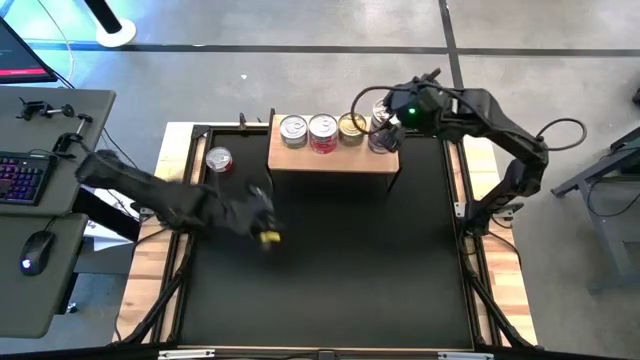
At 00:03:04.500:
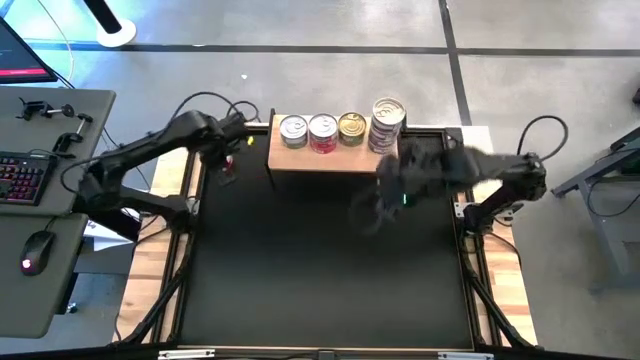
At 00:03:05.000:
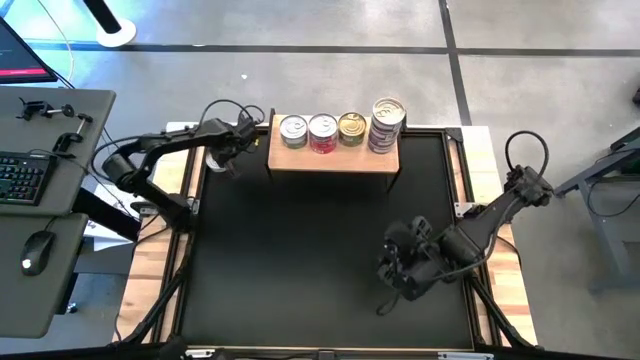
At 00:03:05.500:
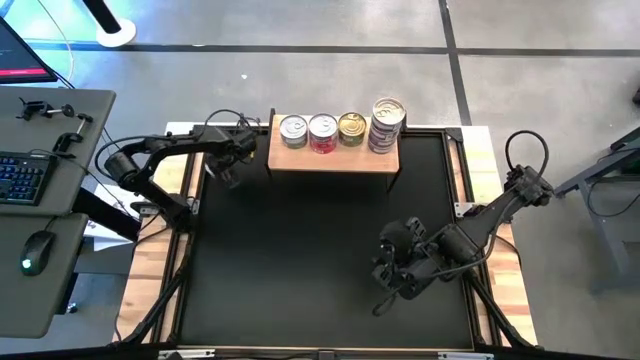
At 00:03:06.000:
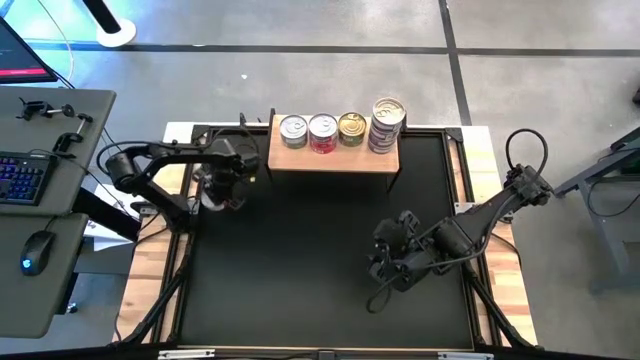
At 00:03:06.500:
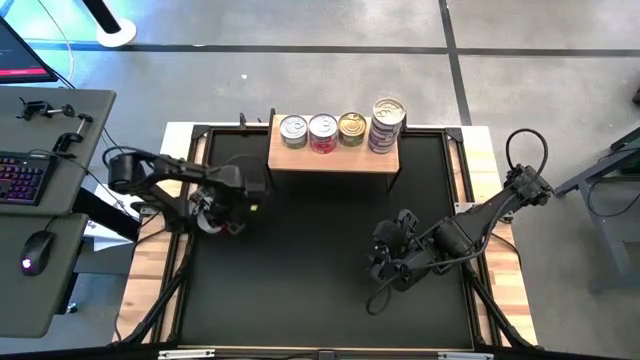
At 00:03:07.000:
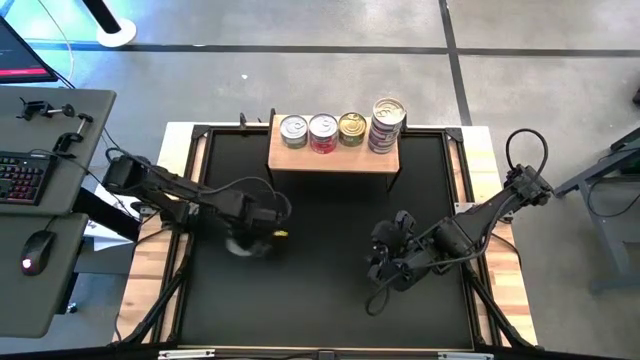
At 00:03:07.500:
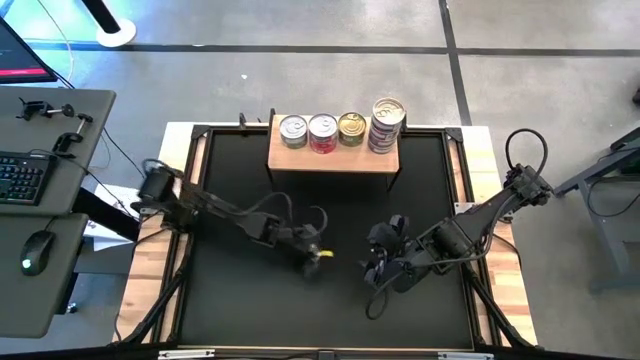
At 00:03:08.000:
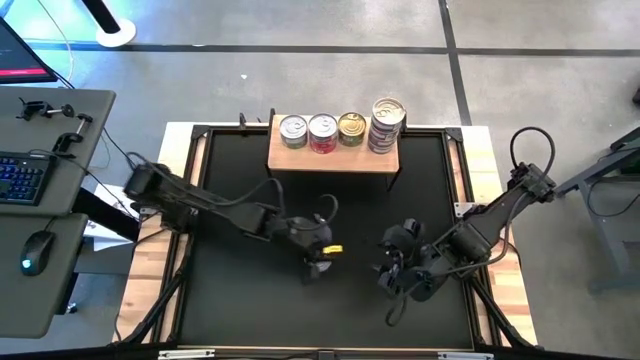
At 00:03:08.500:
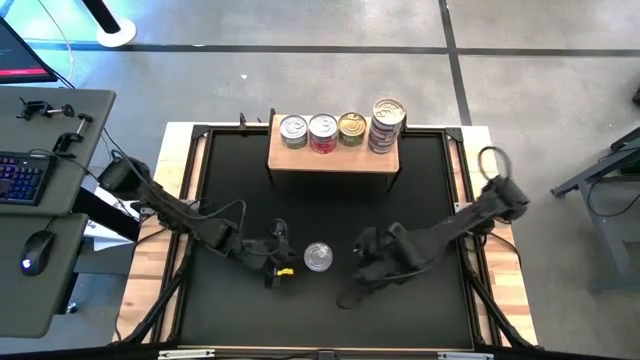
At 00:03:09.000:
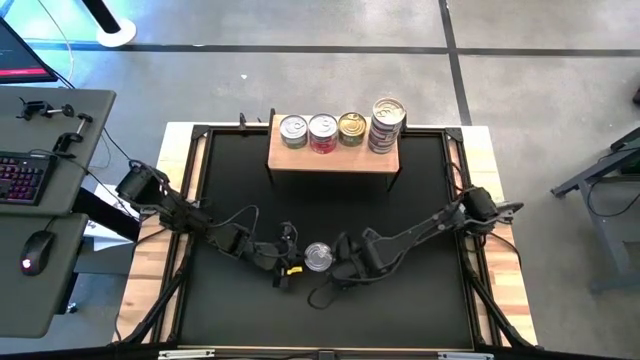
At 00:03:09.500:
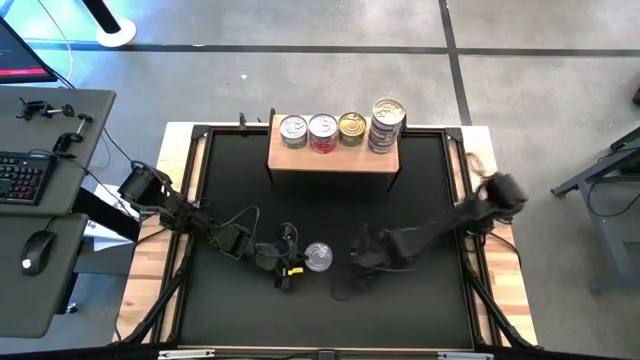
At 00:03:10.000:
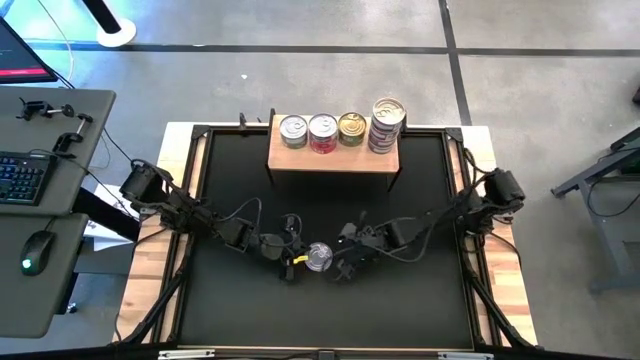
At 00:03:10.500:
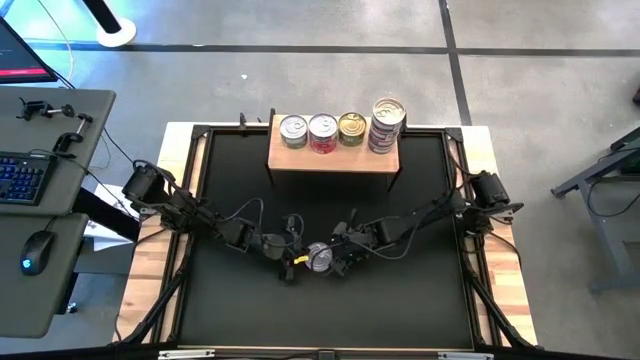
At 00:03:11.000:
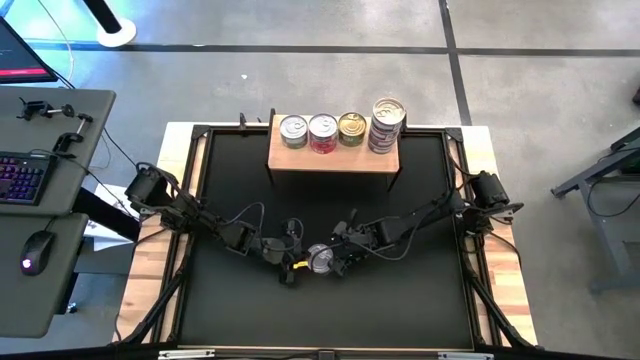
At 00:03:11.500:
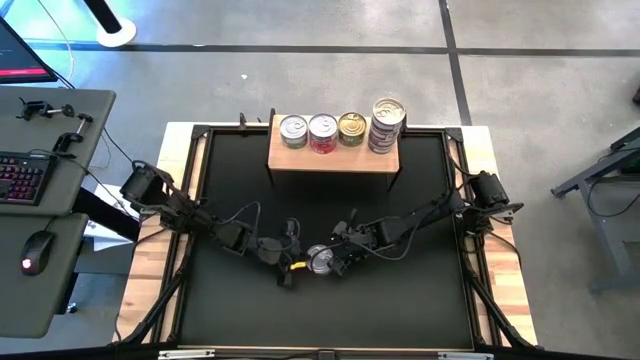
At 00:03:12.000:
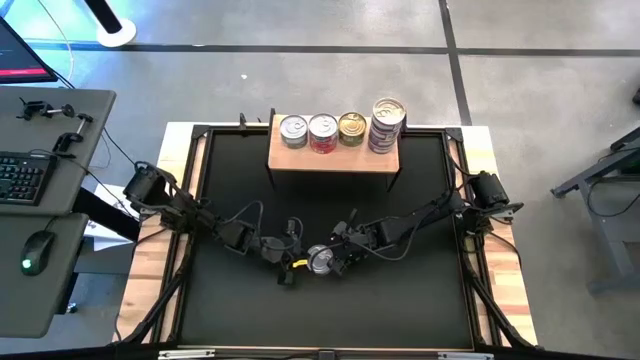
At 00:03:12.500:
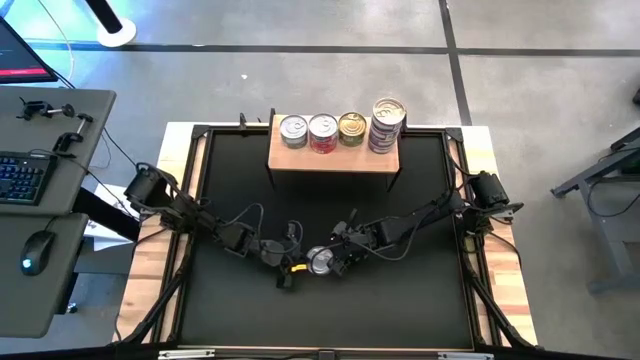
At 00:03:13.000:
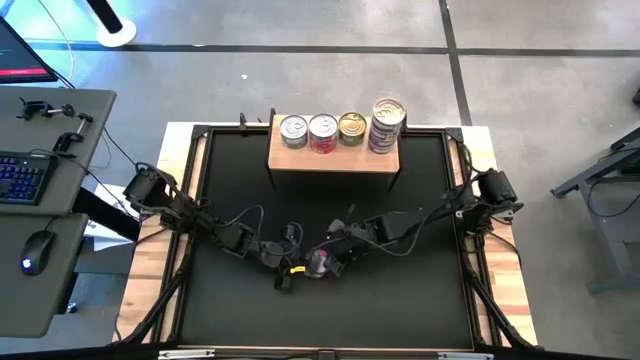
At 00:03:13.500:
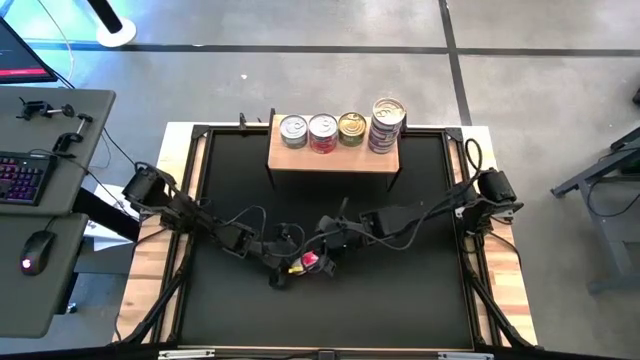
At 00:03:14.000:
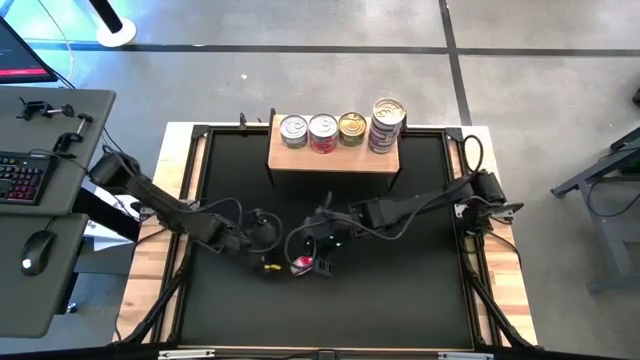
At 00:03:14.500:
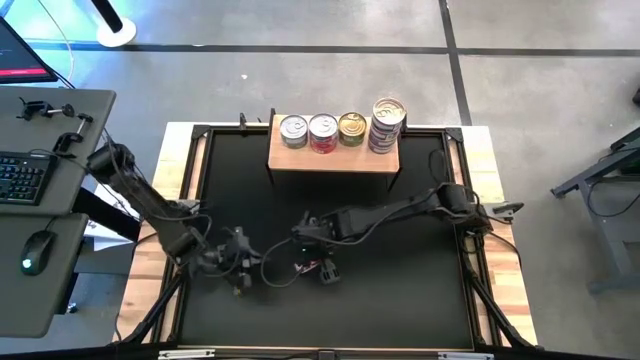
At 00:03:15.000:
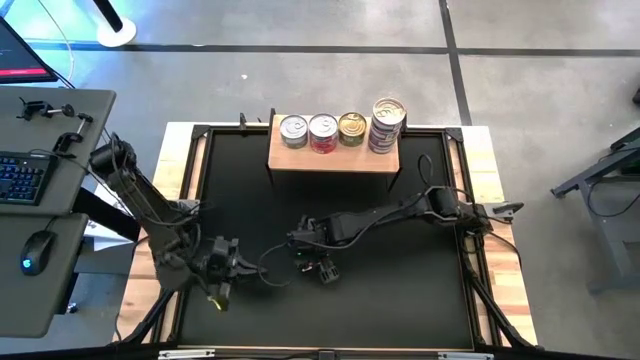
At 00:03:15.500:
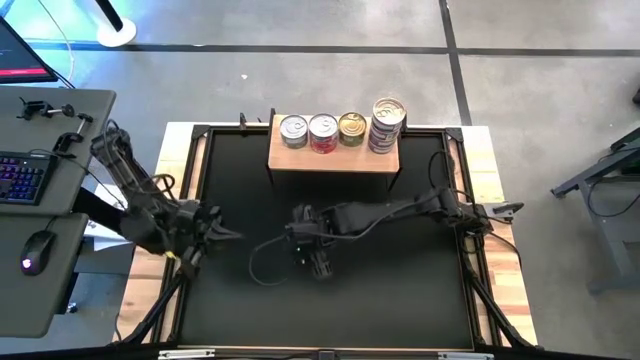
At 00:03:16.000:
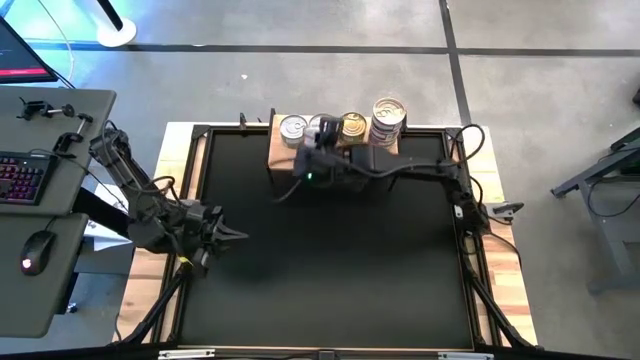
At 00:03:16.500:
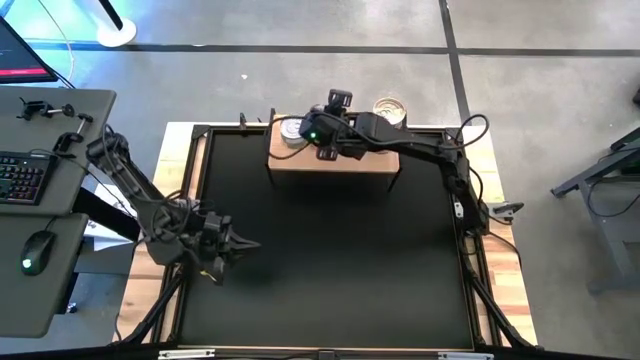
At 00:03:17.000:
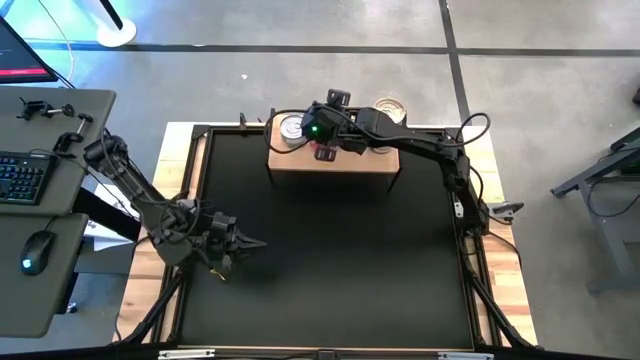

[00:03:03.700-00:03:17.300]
Task: Stack canned seafood by type on shelf
Stack the red tuna can on top of the other red tuna cans

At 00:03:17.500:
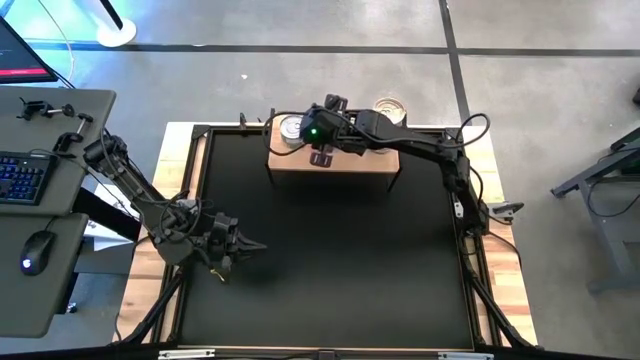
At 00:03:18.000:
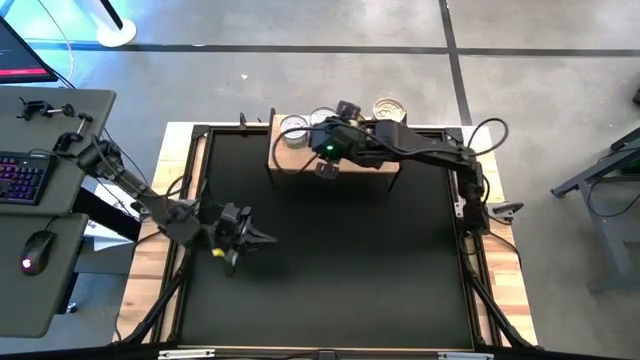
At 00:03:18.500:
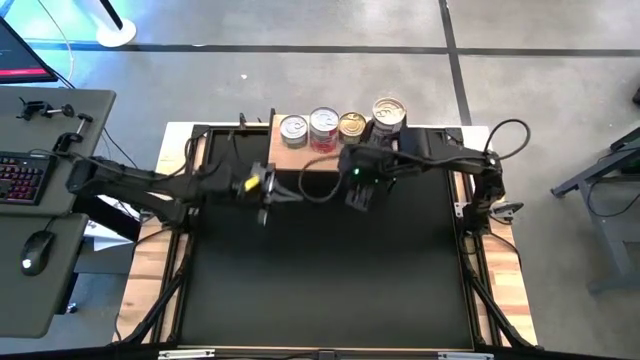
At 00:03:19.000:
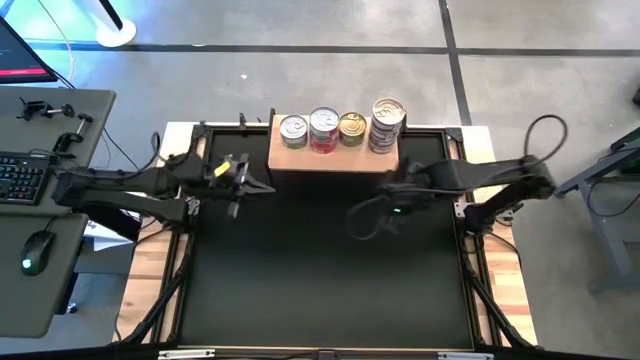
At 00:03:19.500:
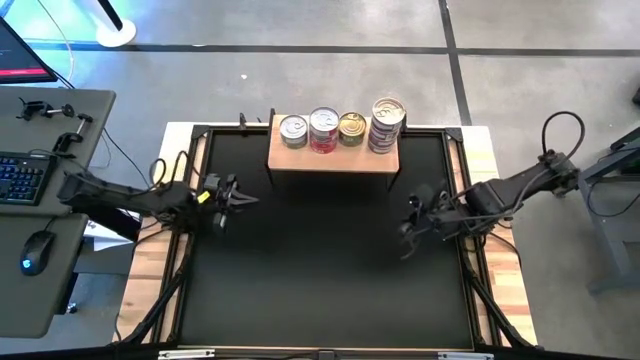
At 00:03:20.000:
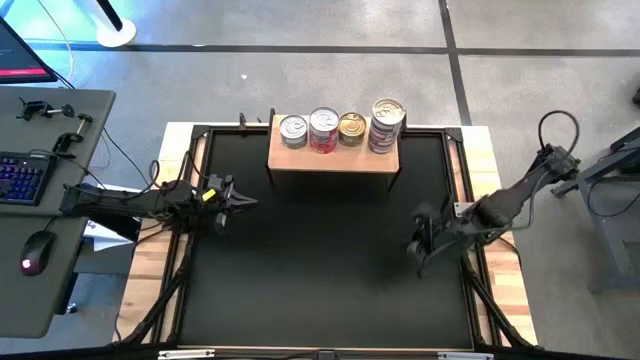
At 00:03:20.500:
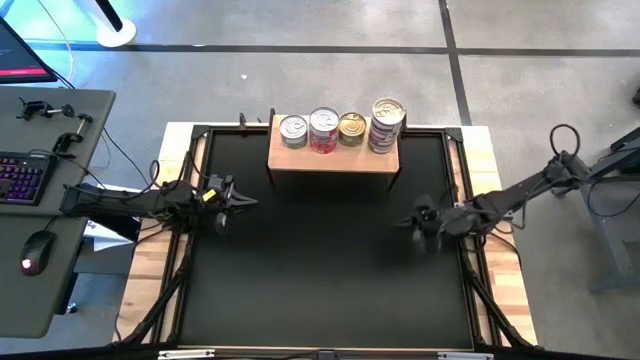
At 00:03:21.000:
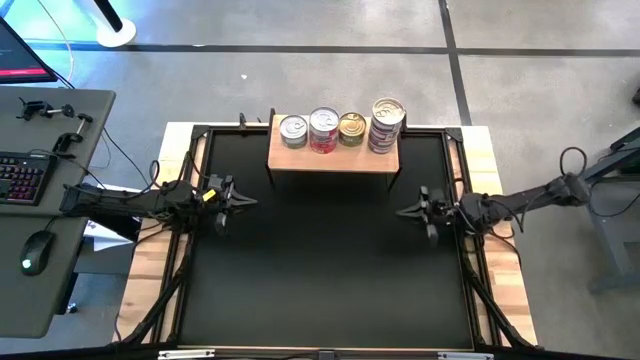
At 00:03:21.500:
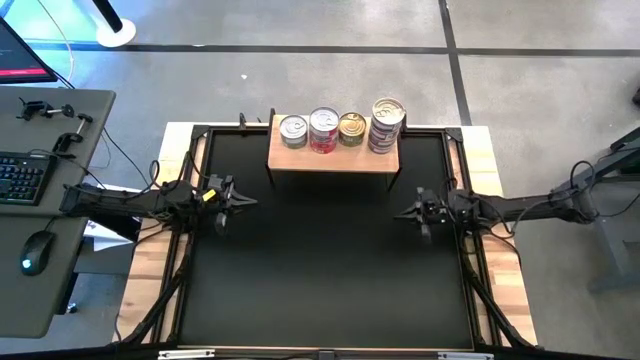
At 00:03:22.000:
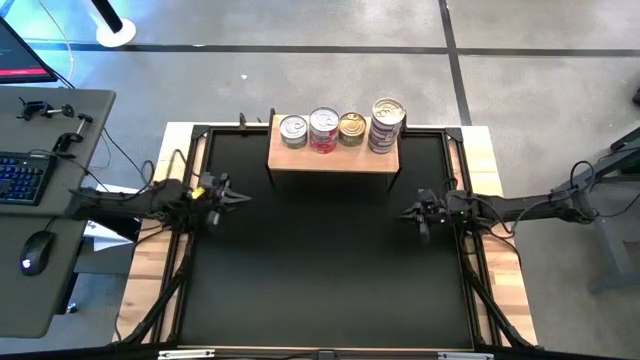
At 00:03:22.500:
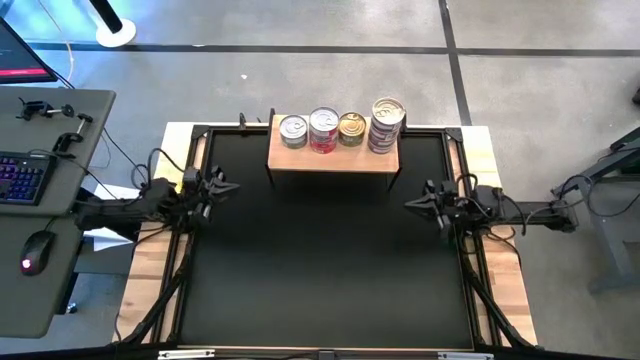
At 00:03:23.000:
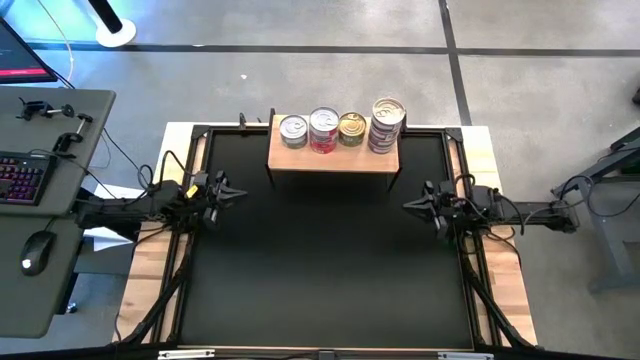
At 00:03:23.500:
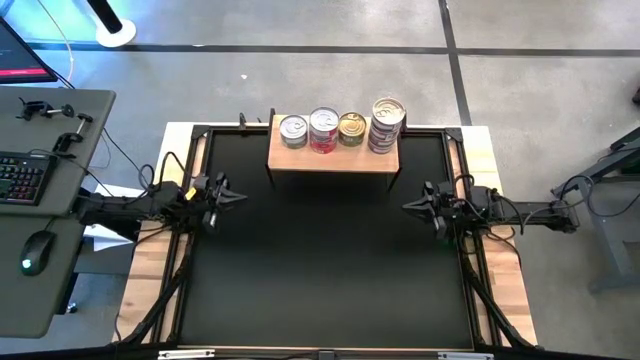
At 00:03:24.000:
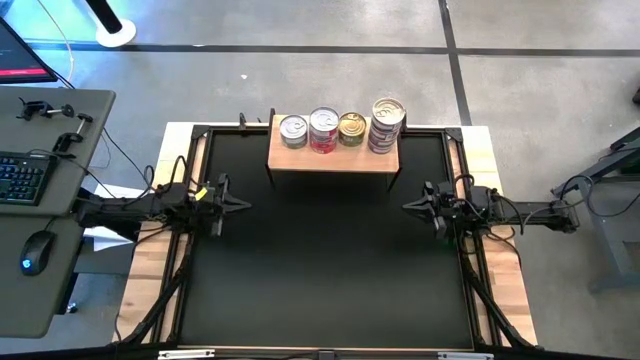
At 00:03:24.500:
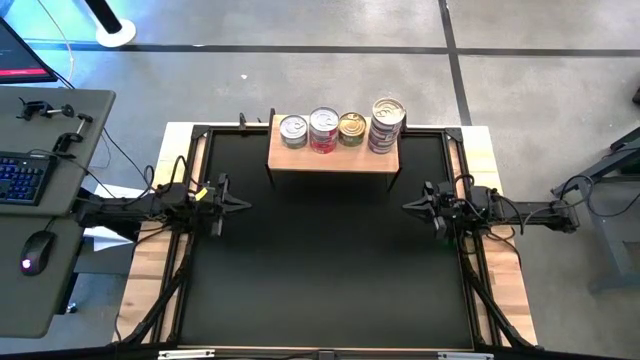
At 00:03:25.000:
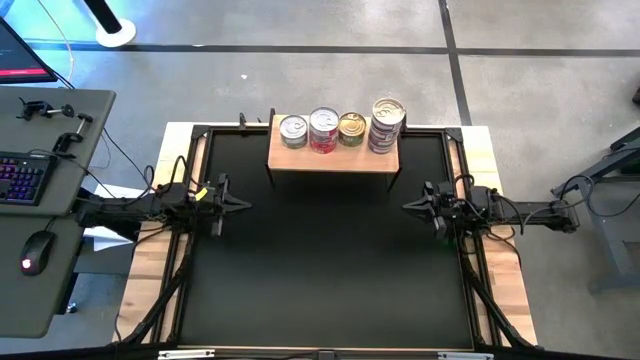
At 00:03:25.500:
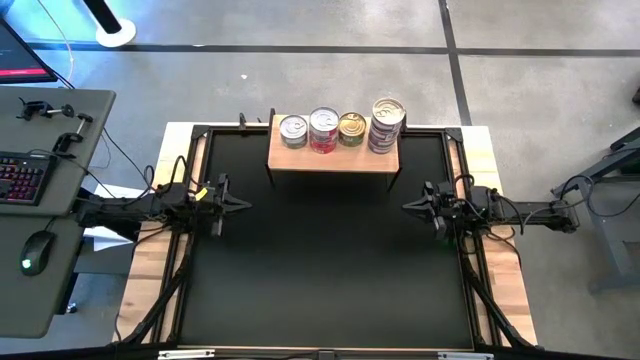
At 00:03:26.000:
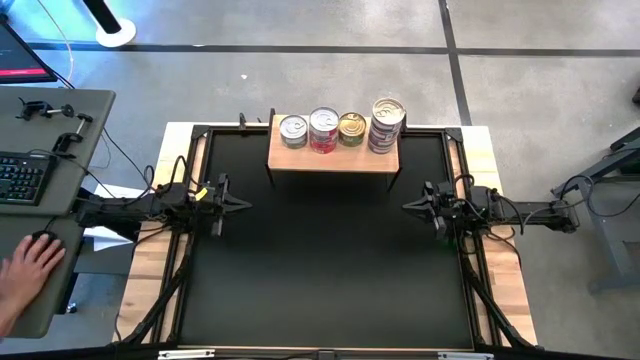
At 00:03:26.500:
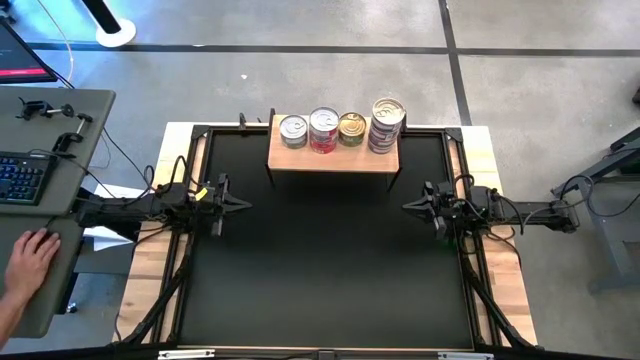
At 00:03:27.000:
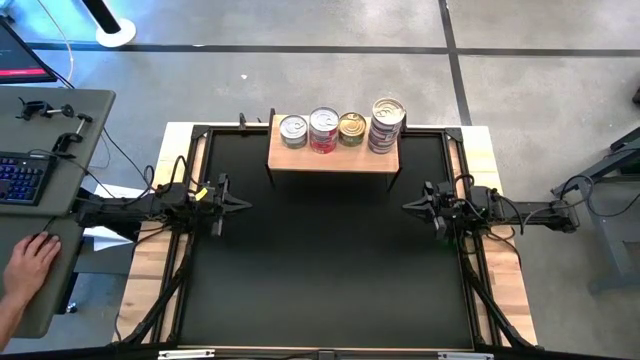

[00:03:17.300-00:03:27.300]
Return to Home Position
